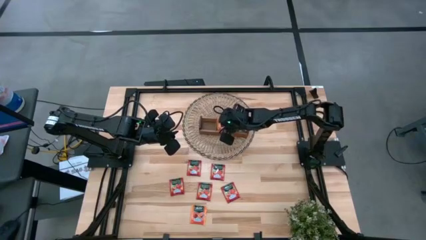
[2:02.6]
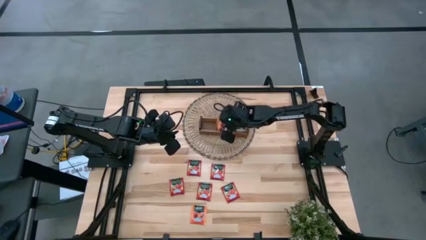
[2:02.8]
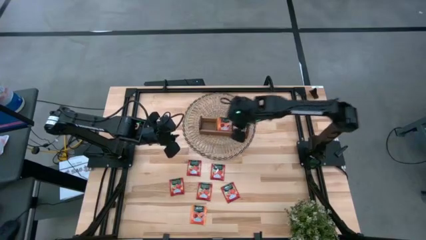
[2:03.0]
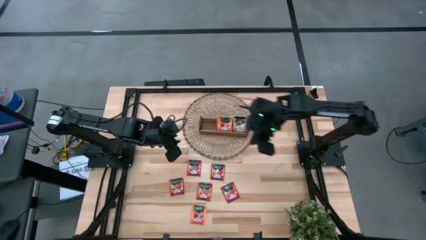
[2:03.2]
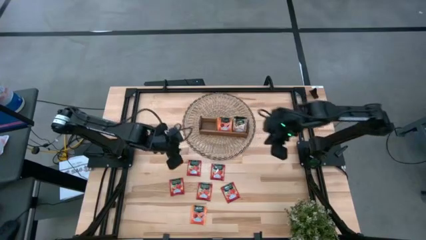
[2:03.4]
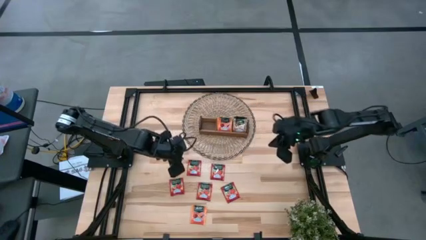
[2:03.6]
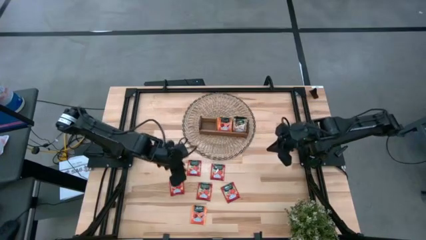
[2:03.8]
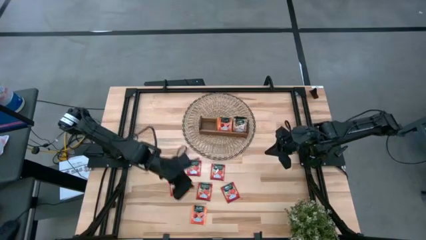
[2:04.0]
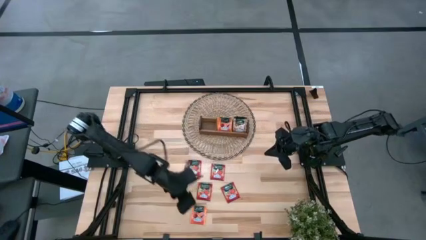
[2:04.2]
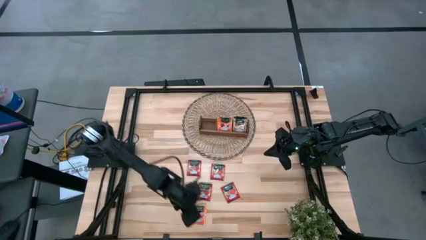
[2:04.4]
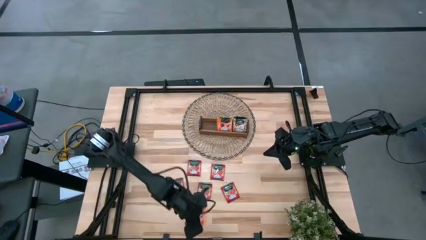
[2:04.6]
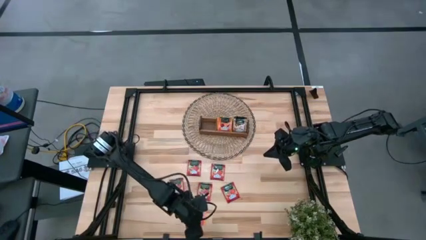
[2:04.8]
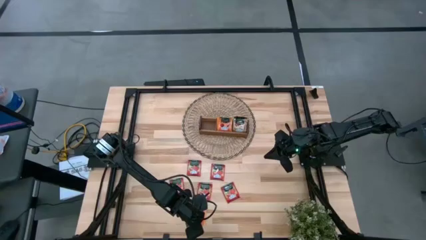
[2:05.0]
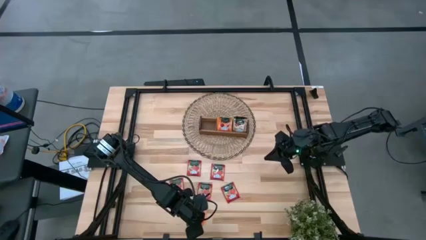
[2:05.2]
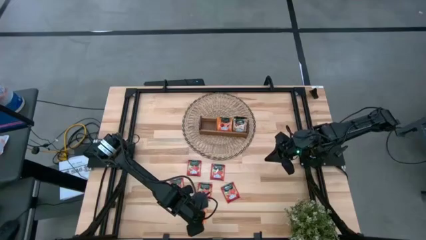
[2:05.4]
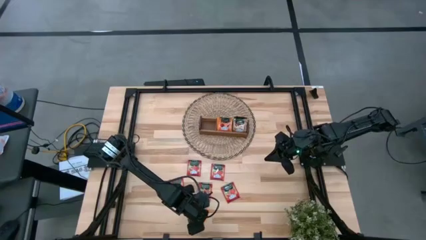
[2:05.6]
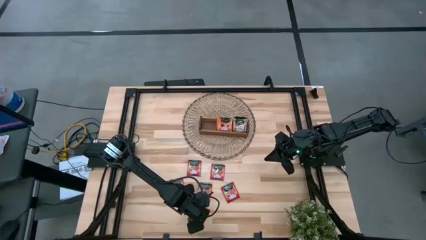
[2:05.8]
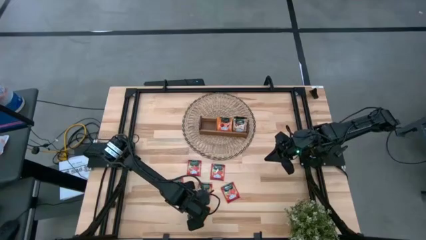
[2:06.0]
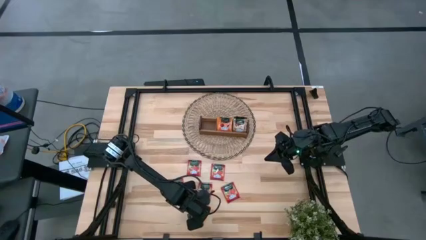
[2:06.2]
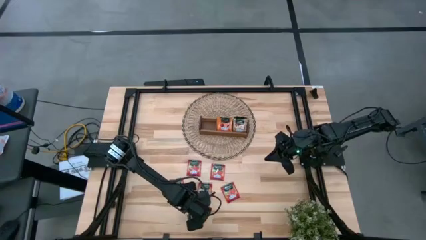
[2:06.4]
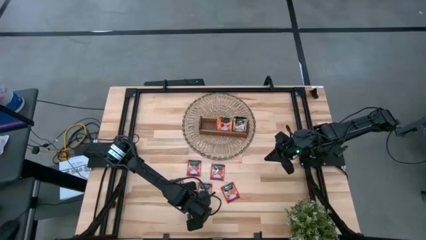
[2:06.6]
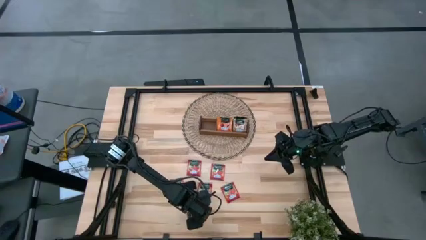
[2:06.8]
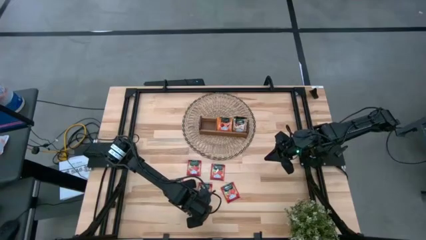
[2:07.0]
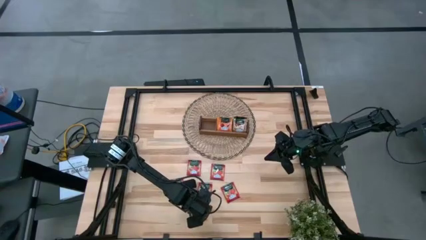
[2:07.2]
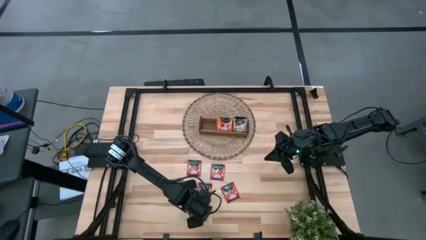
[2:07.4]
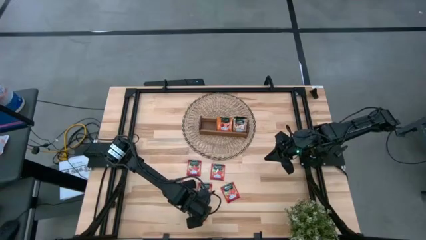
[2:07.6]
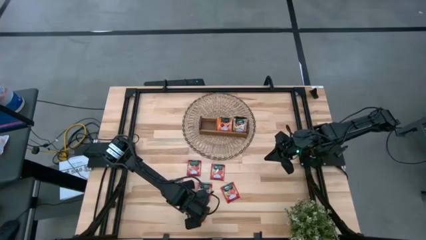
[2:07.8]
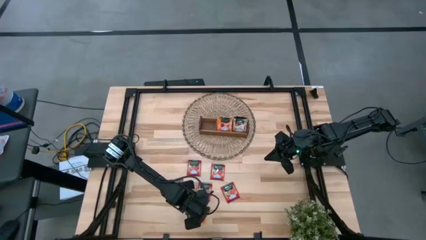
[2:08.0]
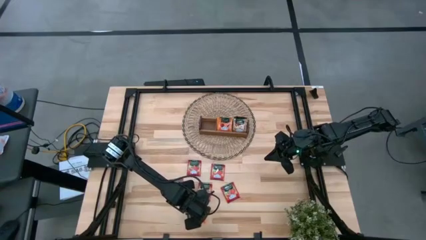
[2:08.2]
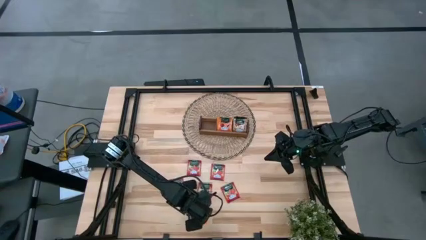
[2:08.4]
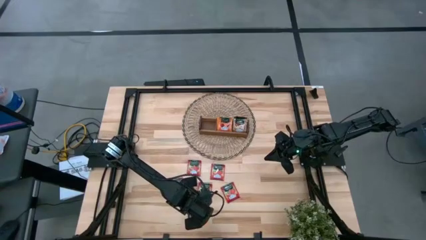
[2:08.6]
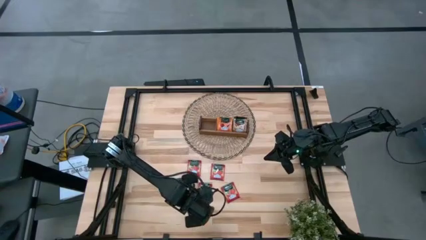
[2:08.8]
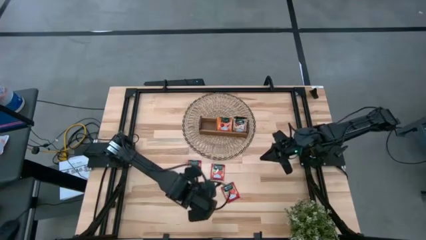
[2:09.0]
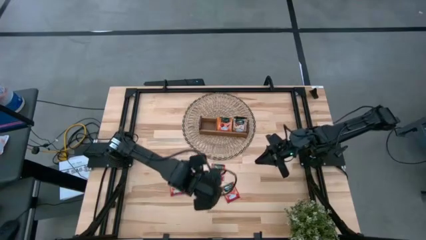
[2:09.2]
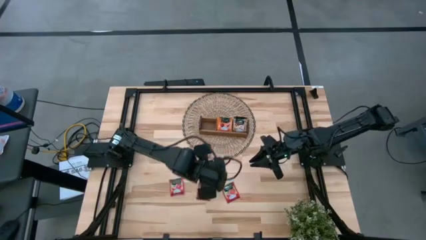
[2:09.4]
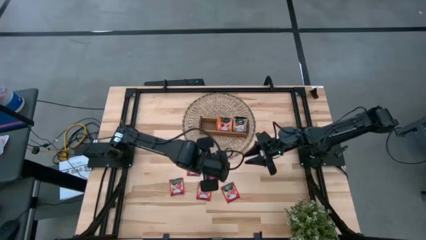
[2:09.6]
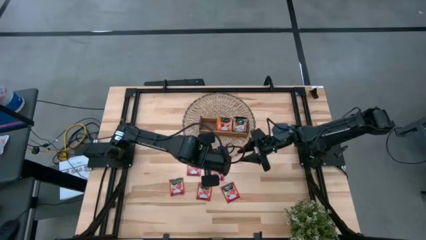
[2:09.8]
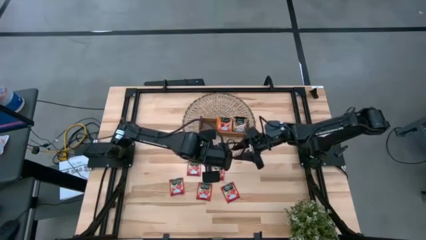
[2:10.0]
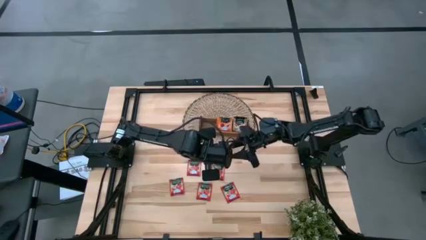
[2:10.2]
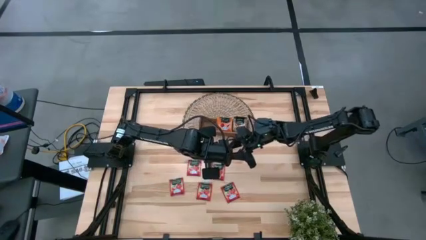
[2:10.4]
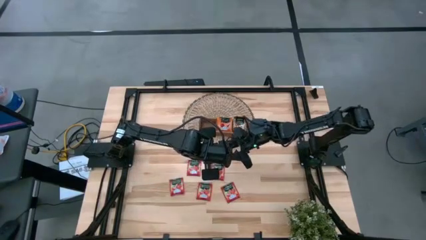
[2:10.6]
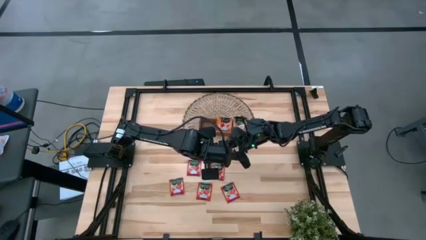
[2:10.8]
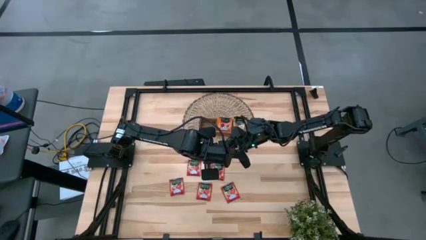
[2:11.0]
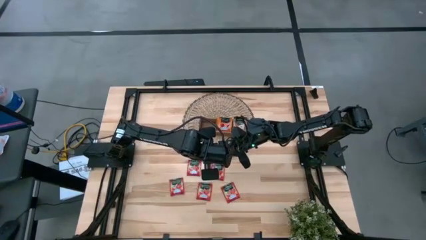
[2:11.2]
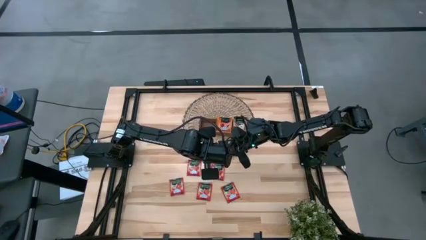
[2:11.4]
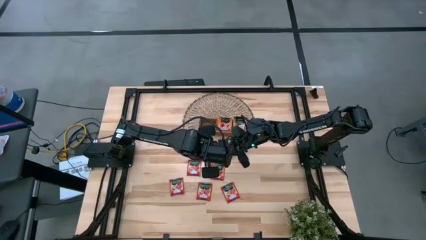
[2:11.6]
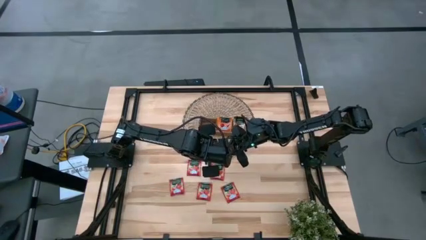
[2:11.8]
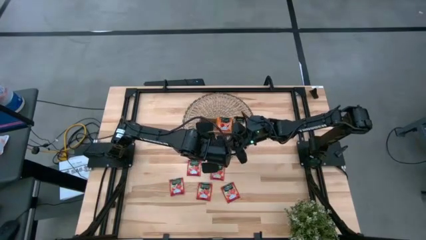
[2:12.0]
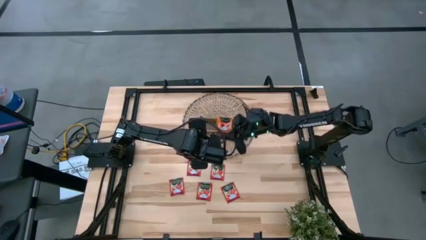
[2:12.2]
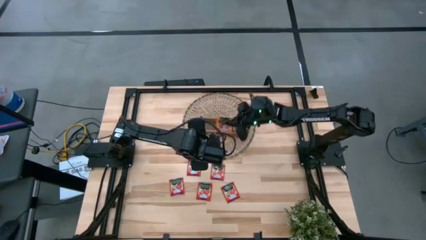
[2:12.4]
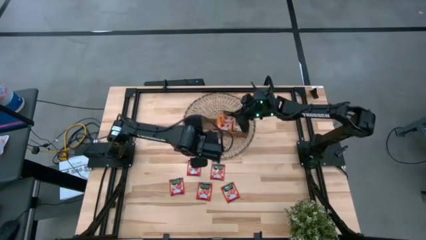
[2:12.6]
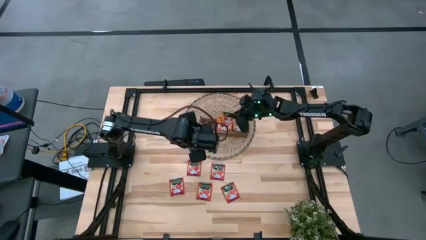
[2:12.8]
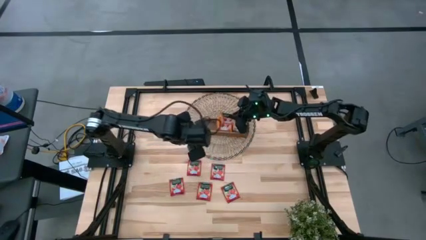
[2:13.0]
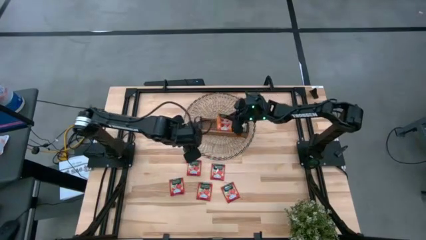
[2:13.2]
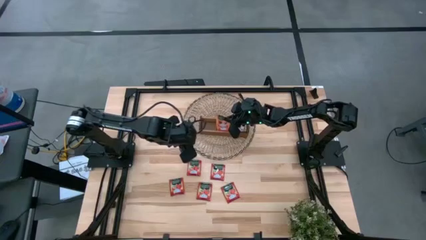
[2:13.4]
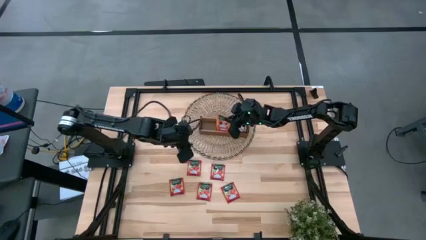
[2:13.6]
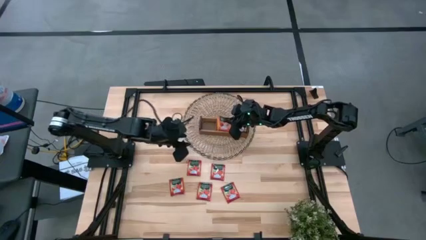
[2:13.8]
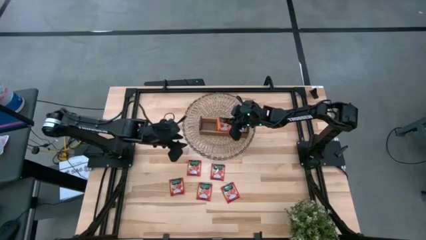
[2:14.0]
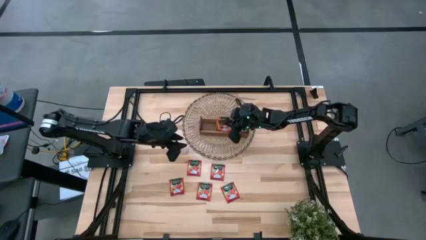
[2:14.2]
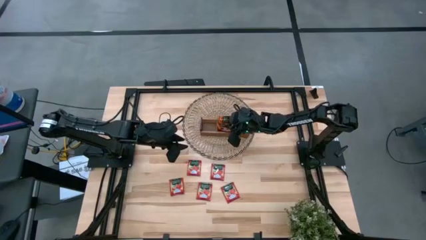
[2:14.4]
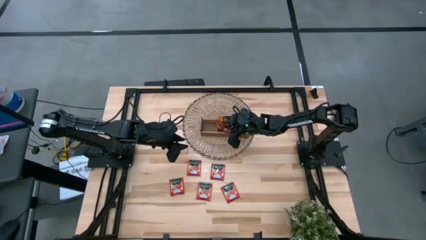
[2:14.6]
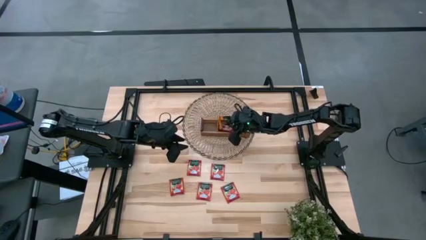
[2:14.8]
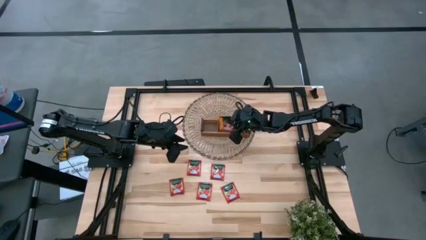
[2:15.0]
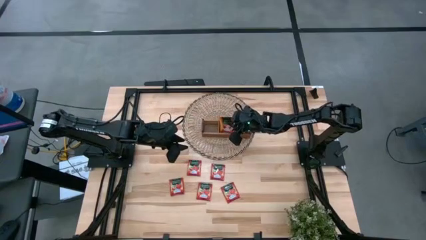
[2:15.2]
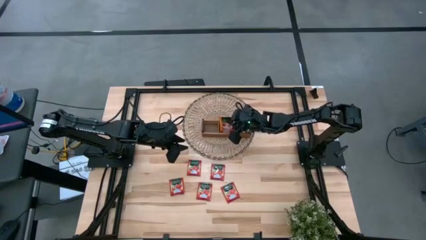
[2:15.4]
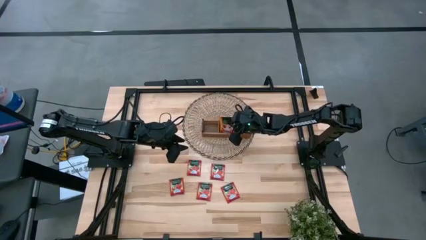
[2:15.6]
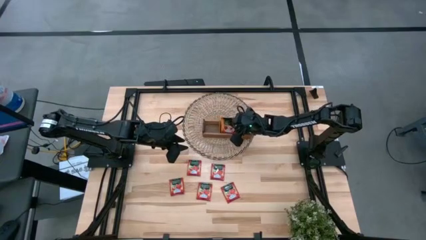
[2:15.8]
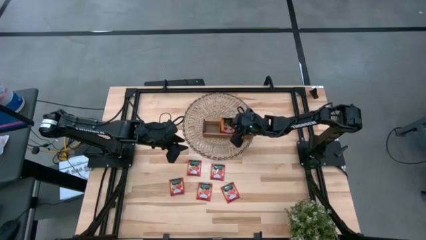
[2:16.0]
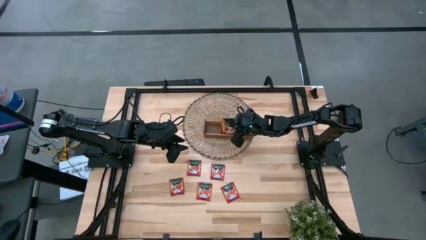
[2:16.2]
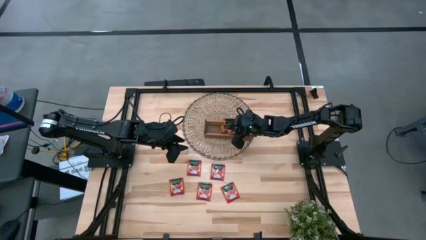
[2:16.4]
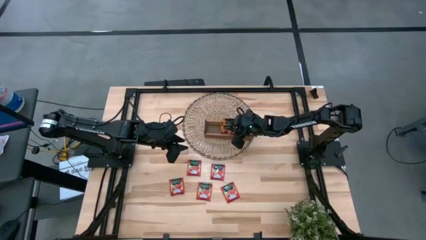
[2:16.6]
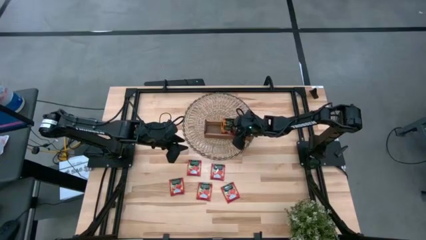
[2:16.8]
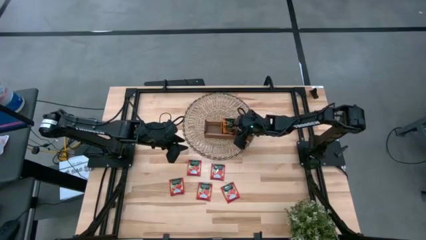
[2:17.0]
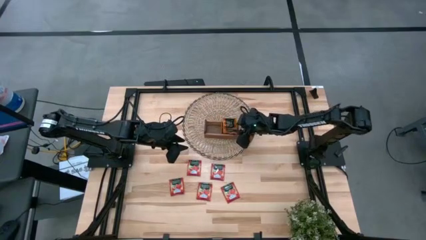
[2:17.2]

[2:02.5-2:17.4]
Task: Pick & Place Tea
Put the orange tea bag into the middle slot of the wooden organizer

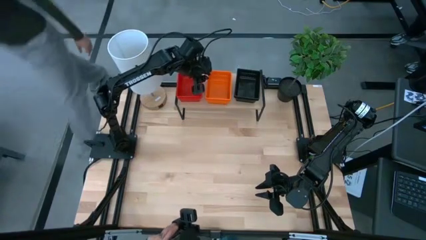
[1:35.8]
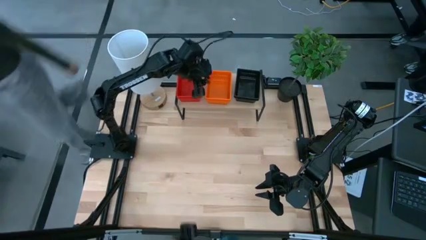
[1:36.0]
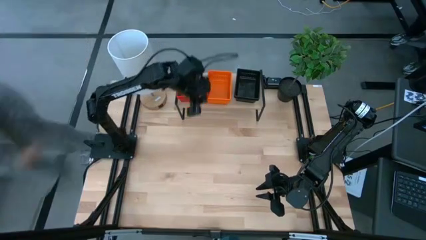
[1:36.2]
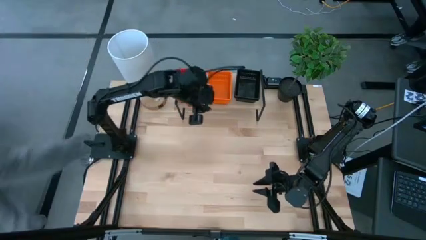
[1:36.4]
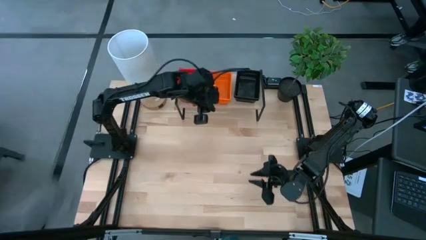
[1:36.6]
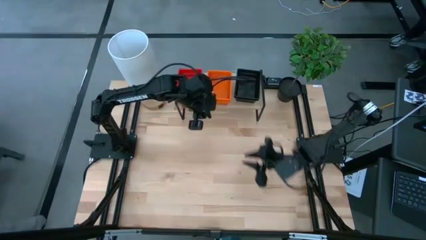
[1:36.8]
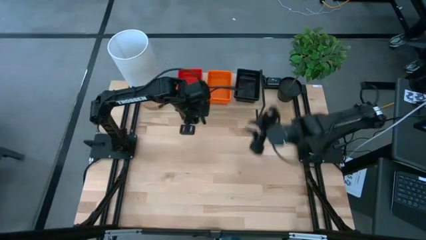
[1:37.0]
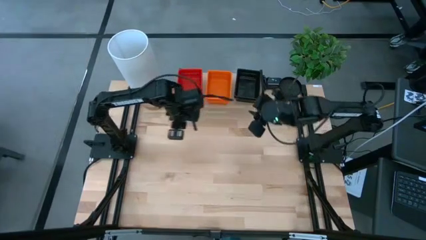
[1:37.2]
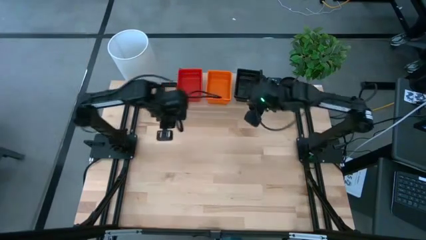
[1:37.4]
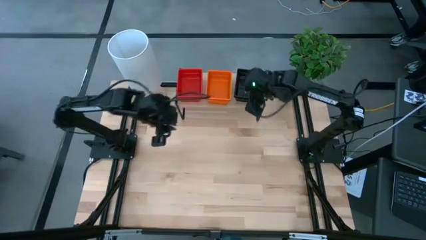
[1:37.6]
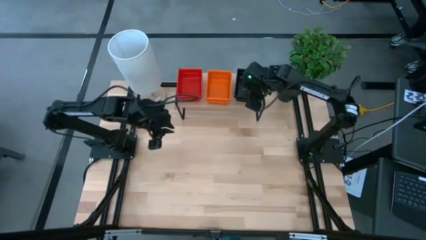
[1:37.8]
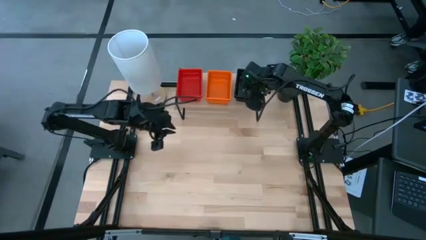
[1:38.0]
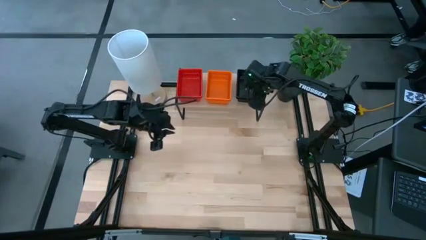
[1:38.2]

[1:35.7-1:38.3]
Task: Stack baskets on shelf by color
Adjust the stacked black basket on the shelf
